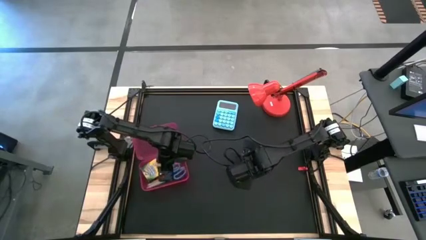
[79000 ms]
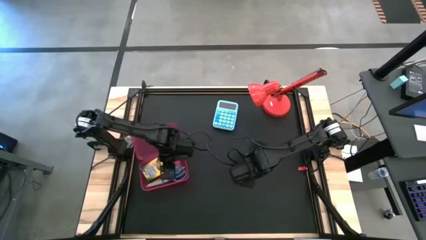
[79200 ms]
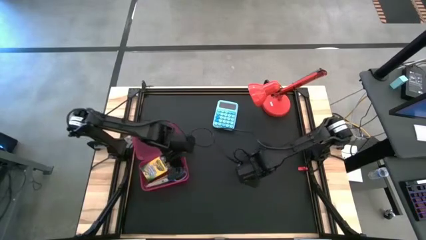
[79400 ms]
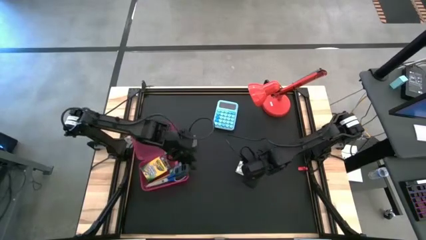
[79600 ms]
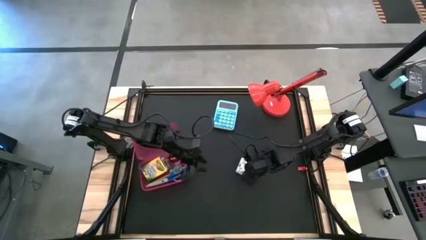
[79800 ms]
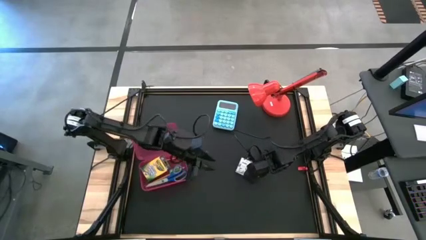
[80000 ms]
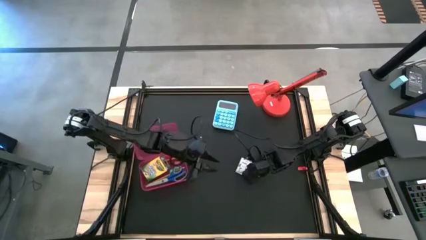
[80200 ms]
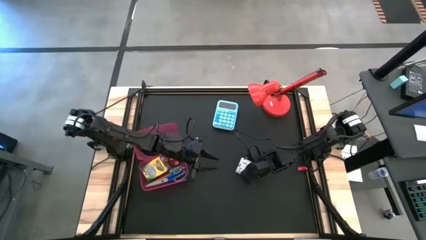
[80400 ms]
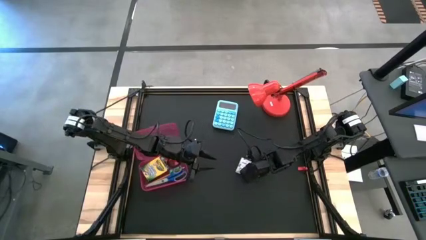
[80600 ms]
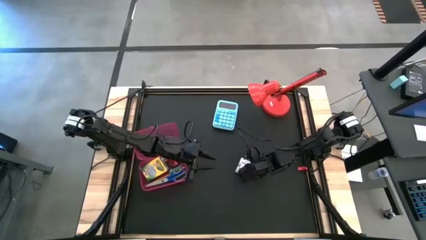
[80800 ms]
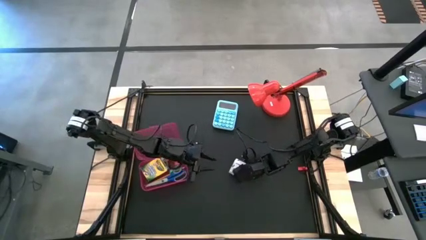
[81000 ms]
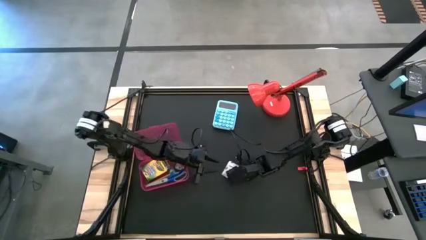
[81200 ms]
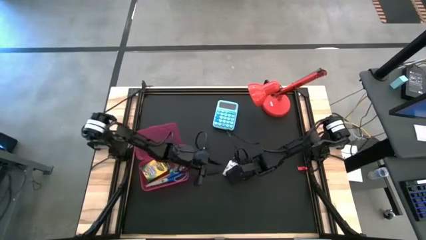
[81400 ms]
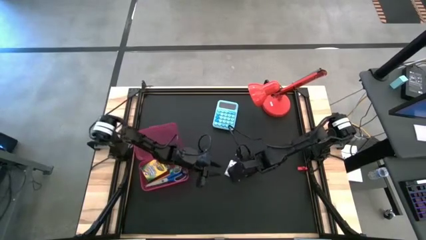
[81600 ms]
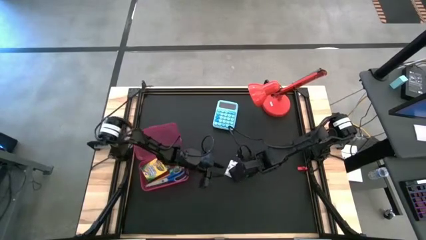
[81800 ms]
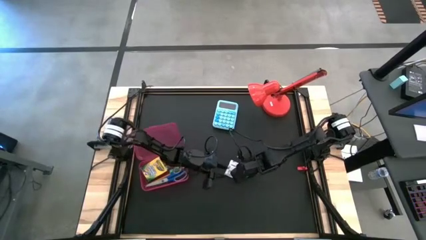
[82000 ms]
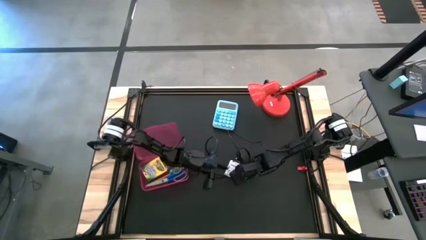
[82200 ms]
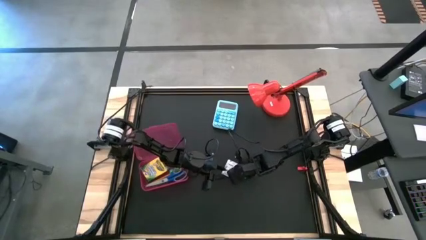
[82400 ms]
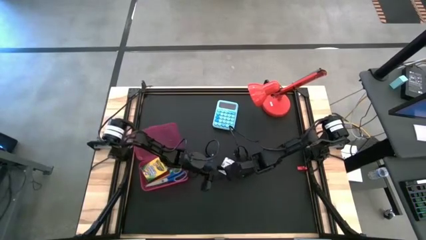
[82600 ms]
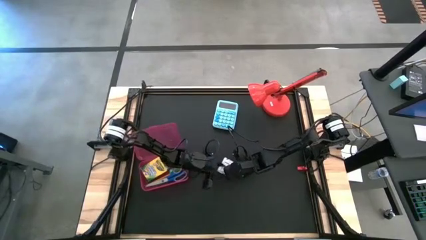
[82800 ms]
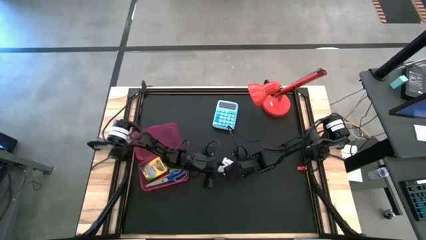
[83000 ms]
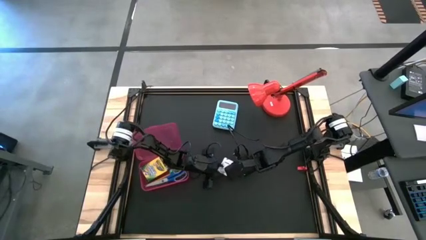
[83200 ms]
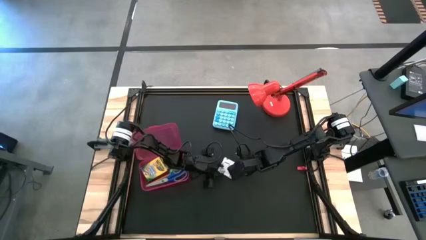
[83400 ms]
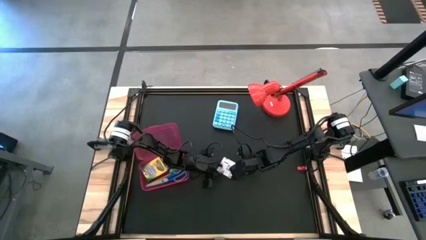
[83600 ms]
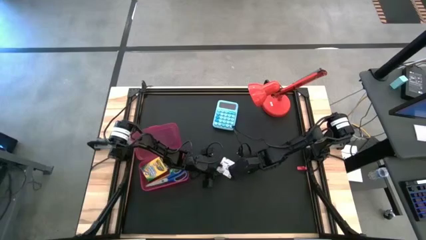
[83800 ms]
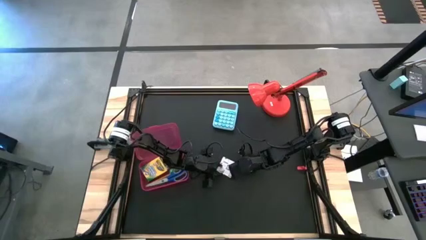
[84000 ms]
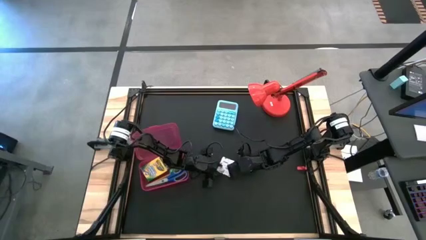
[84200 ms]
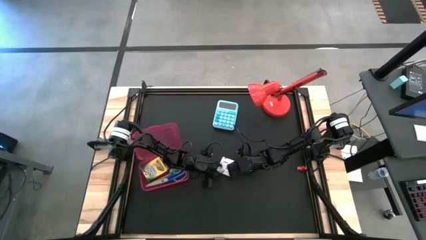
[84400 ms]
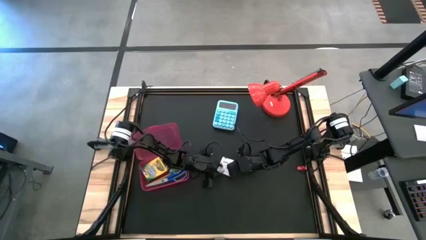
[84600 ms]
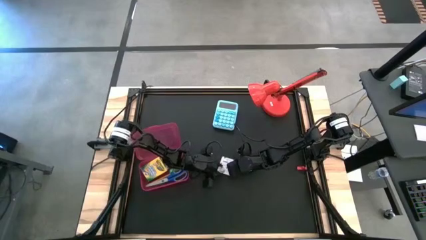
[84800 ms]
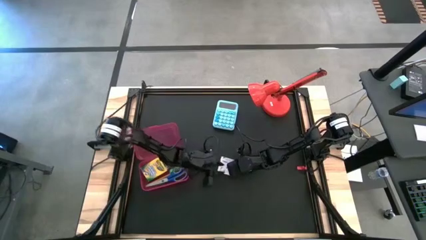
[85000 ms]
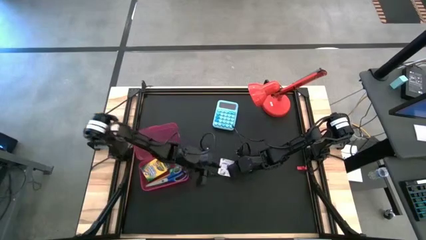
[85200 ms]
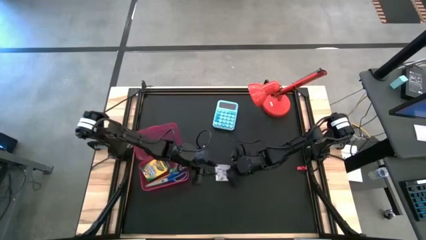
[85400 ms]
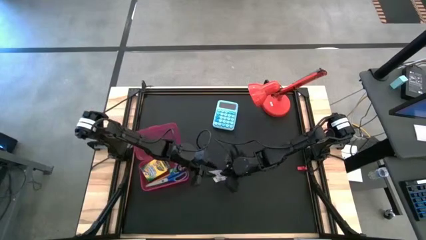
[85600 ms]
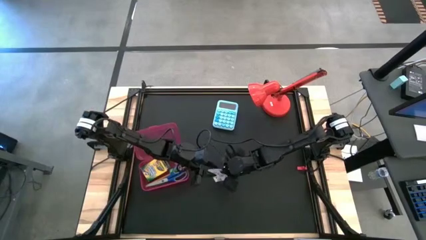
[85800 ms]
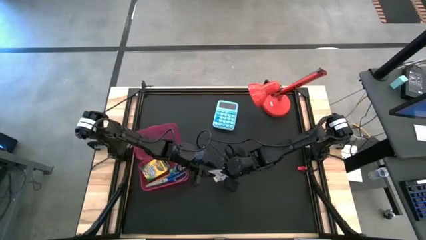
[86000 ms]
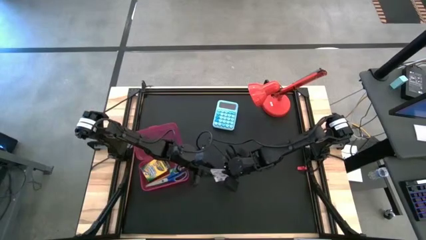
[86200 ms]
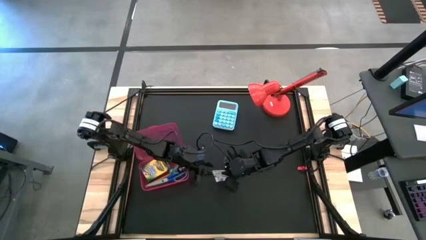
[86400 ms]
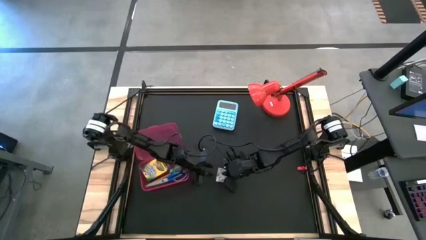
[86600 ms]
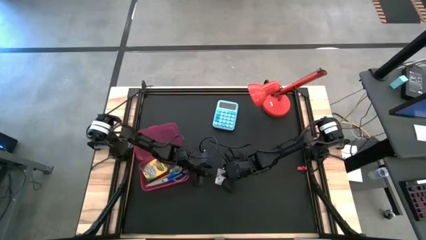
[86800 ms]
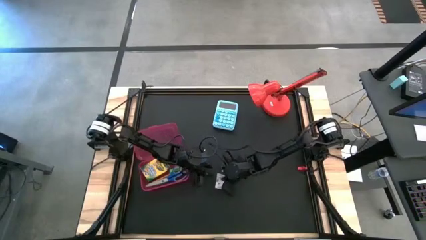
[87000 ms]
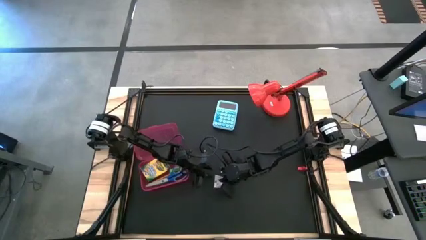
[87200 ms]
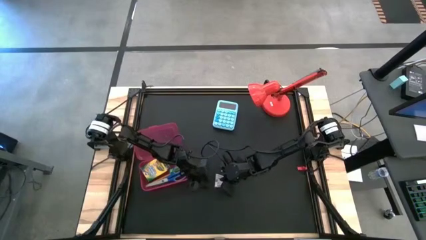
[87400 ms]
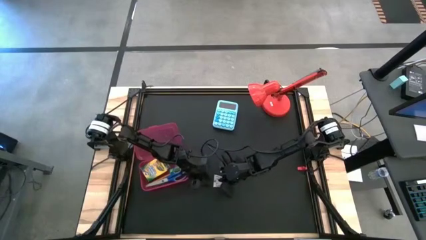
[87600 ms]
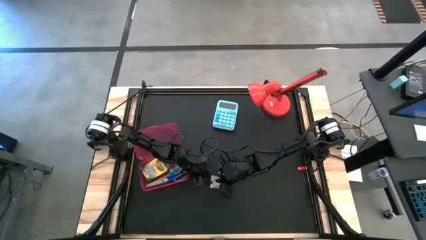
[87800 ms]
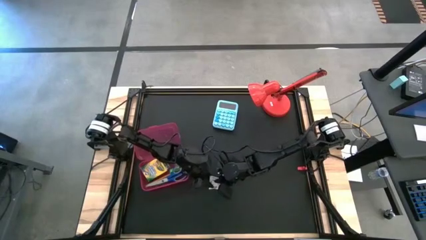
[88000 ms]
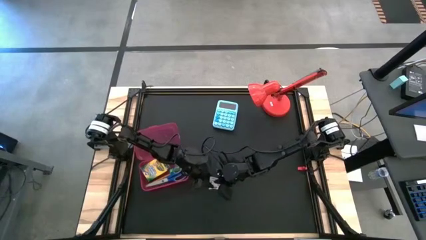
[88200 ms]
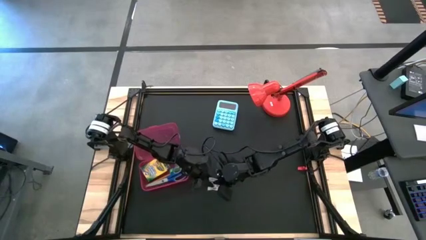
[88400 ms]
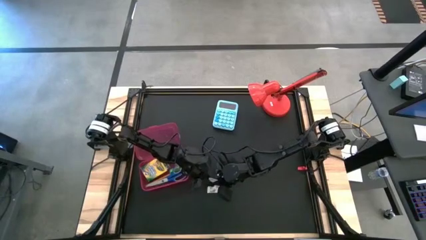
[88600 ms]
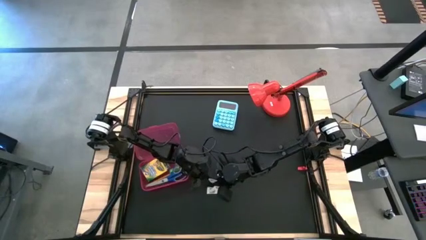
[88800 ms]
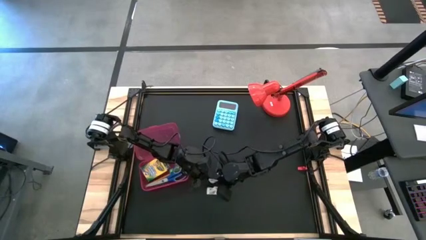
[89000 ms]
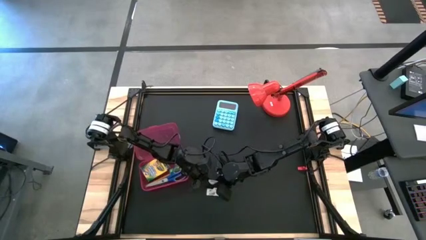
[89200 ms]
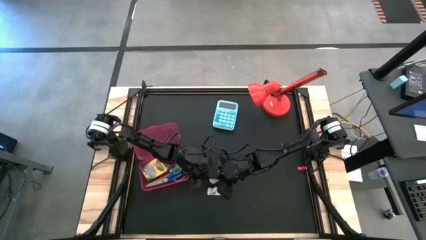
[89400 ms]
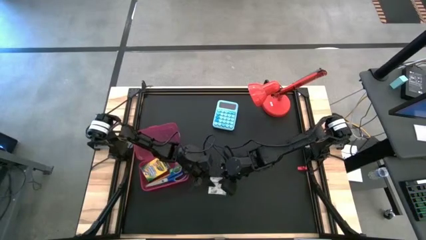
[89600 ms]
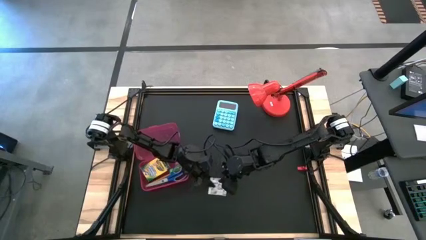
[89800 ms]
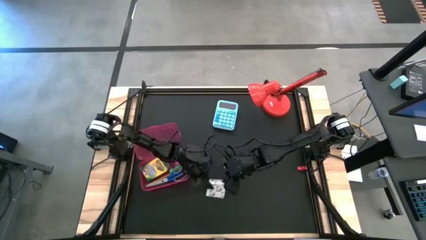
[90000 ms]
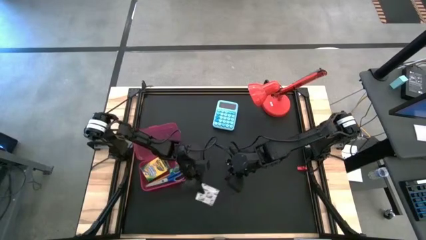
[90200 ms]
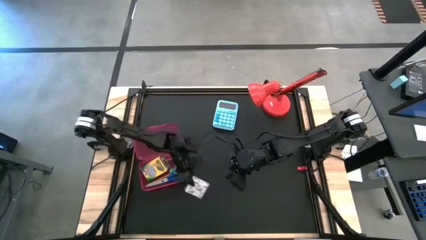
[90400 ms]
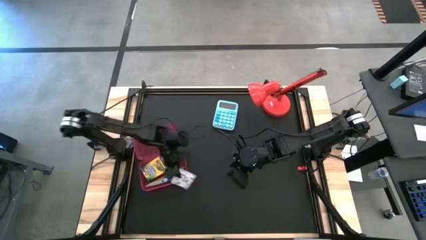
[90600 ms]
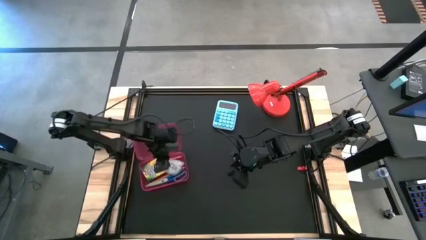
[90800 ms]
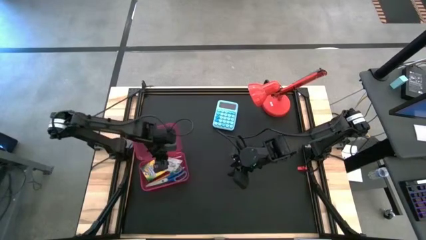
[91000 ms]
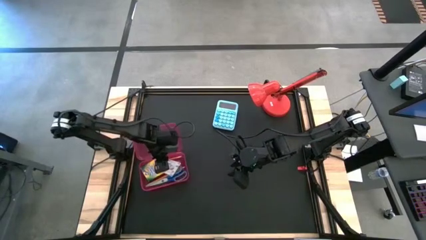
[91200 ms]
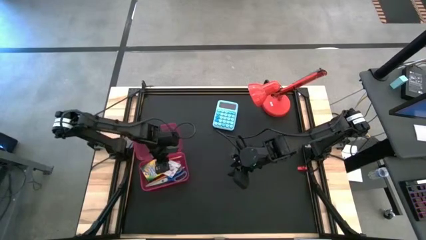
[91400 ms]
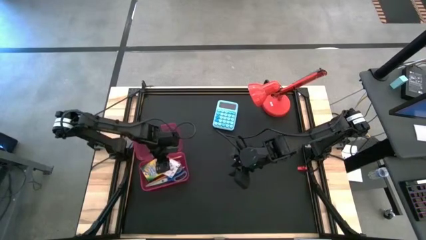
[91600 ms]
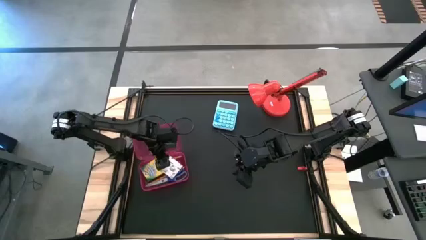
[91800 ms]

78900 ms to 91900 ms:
Task: Pack school essentials
Put the white sticky notes into the red supply box

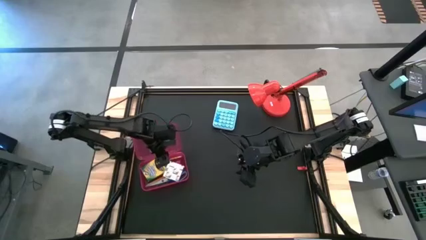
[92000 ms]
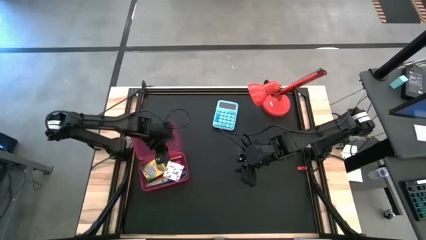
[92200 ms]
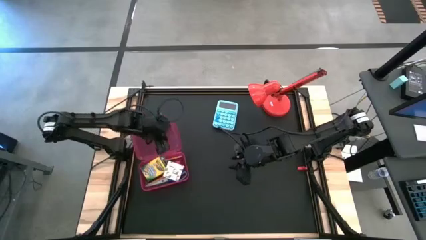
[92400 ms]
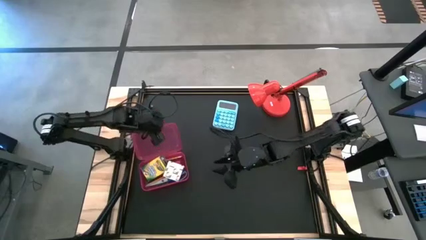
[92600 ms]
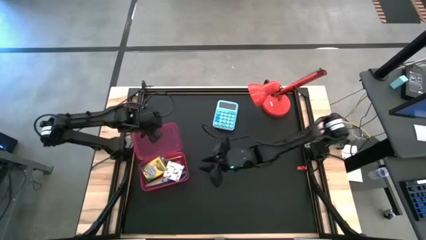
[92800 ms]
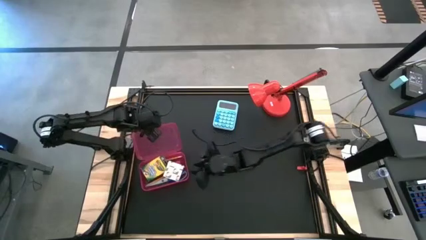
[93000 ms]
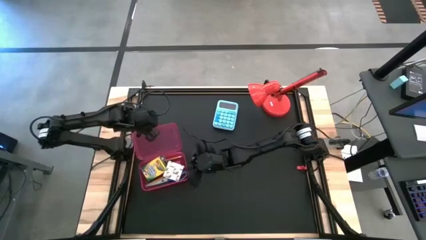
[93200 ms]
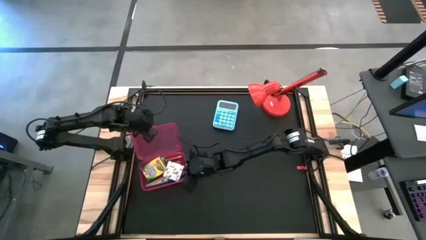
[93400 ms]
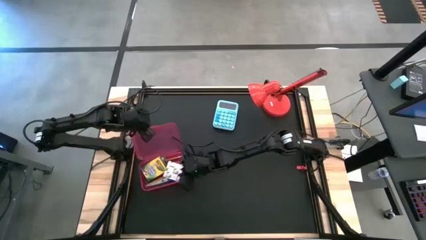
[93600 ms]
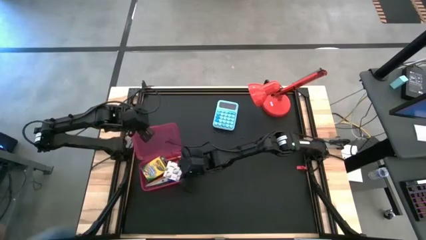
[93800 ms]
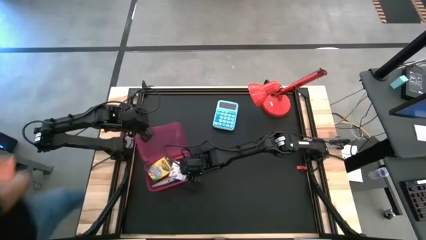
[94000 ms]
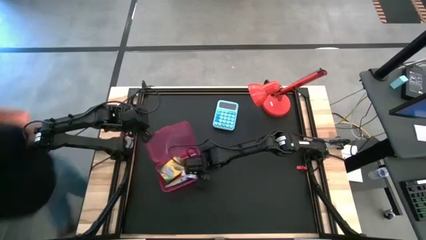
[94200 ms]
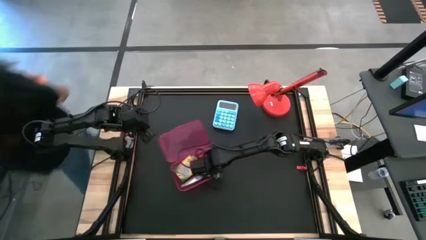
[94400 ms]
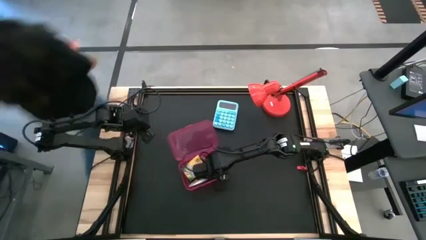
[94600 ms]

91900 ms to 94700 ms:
Move the red supply box to the center of the table
